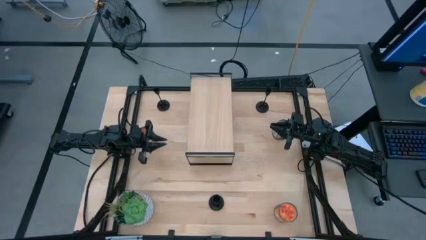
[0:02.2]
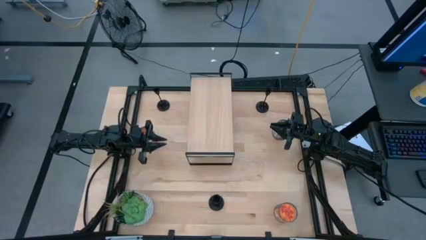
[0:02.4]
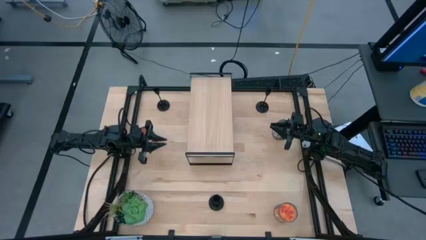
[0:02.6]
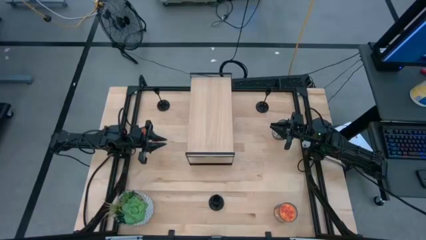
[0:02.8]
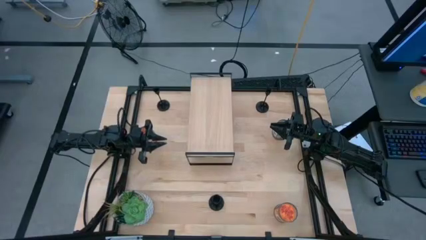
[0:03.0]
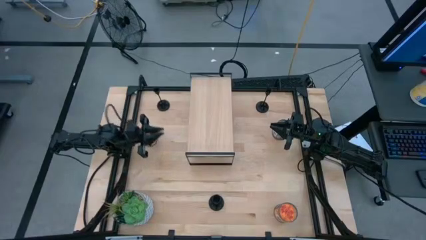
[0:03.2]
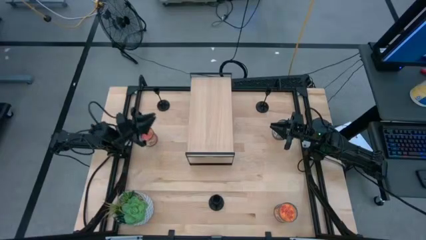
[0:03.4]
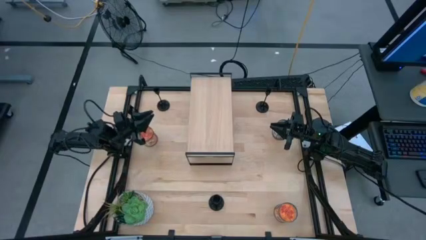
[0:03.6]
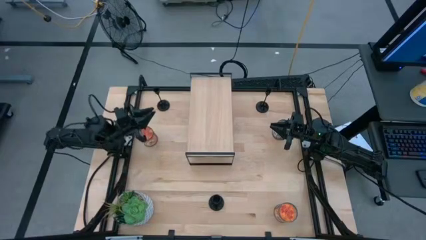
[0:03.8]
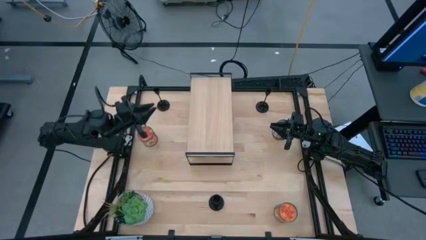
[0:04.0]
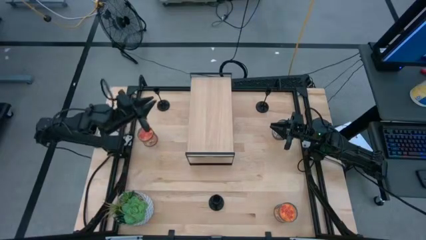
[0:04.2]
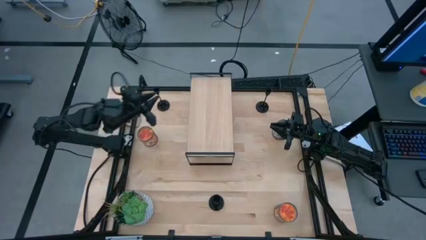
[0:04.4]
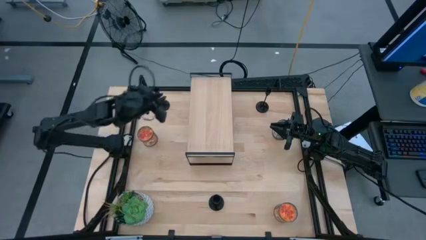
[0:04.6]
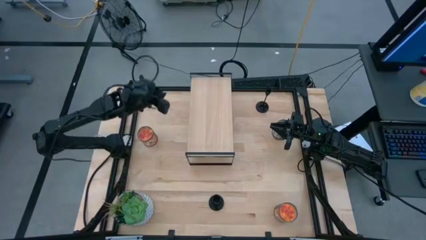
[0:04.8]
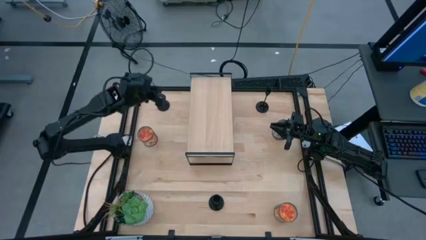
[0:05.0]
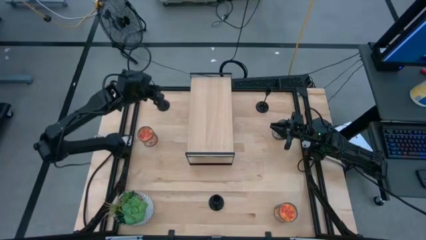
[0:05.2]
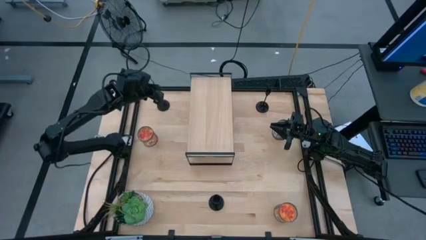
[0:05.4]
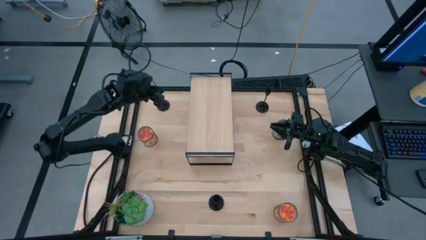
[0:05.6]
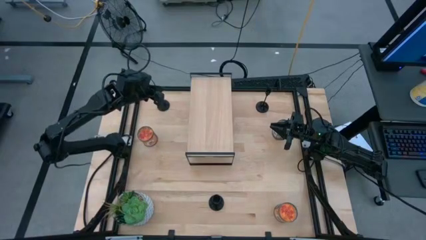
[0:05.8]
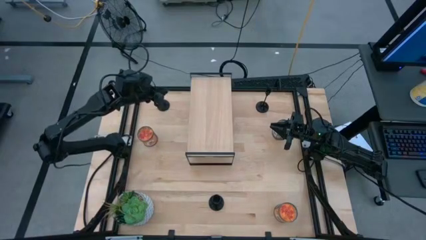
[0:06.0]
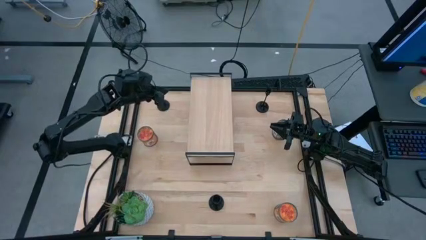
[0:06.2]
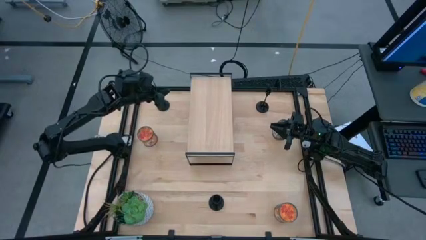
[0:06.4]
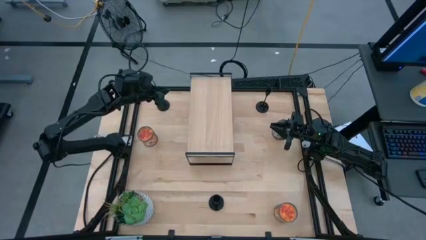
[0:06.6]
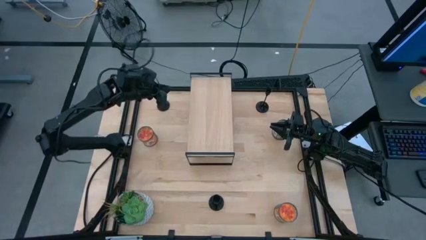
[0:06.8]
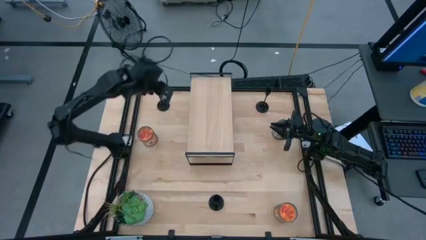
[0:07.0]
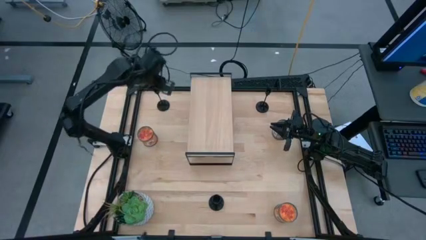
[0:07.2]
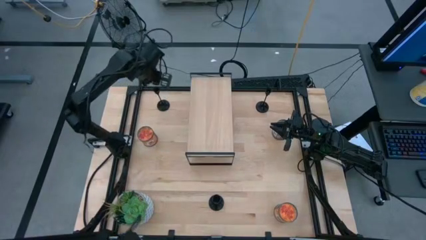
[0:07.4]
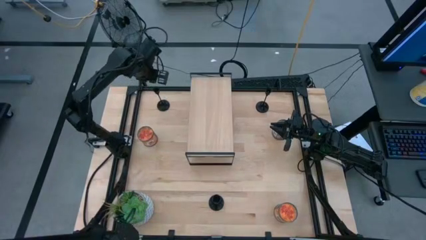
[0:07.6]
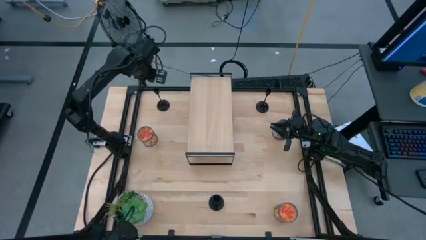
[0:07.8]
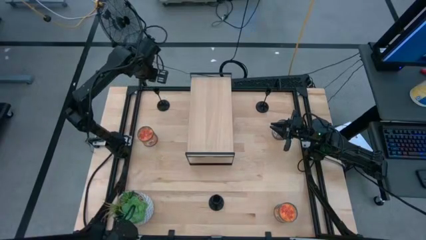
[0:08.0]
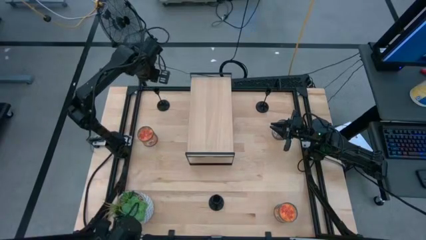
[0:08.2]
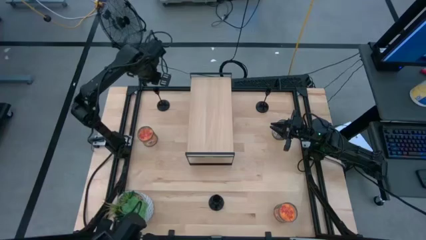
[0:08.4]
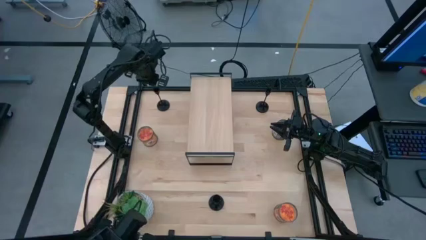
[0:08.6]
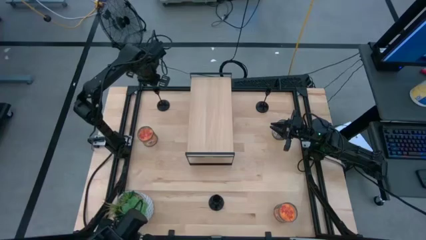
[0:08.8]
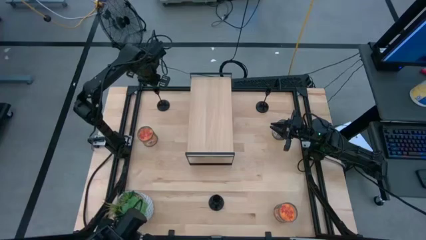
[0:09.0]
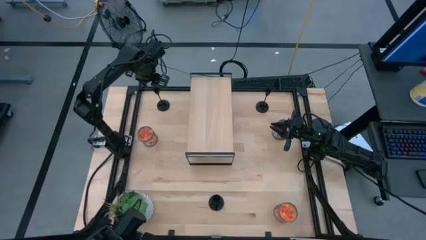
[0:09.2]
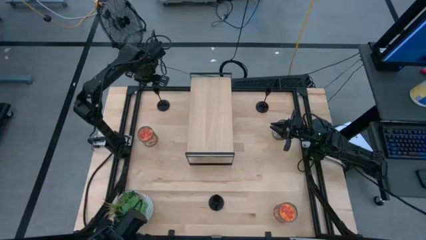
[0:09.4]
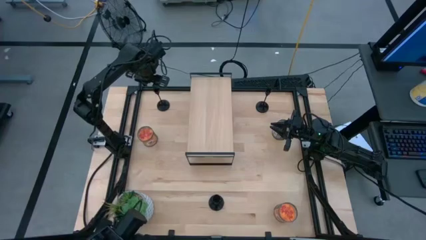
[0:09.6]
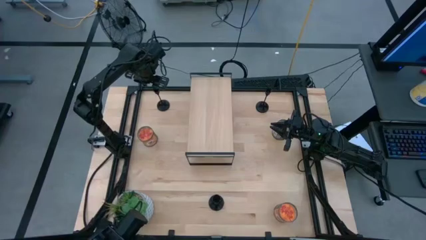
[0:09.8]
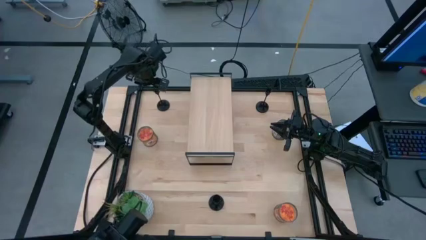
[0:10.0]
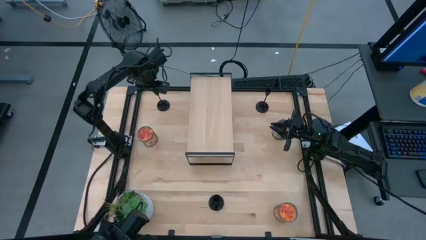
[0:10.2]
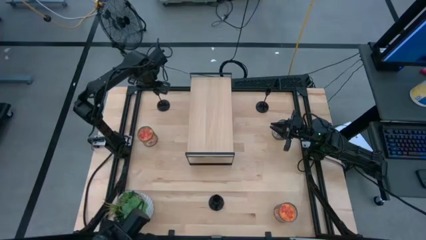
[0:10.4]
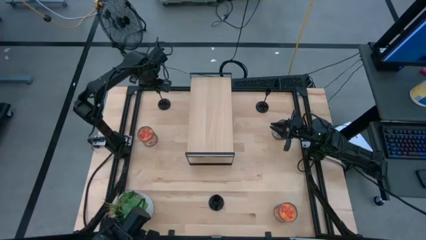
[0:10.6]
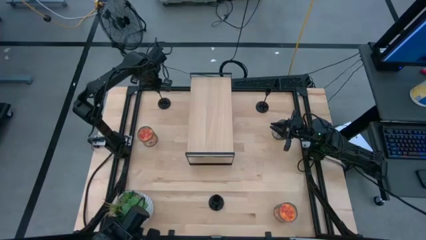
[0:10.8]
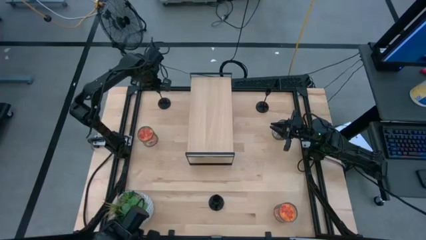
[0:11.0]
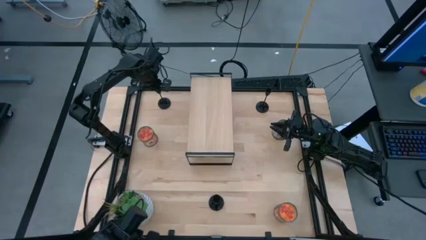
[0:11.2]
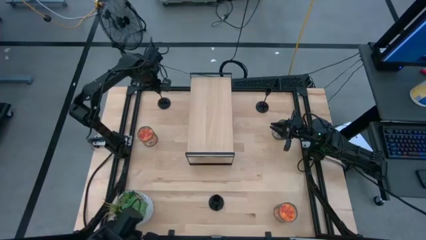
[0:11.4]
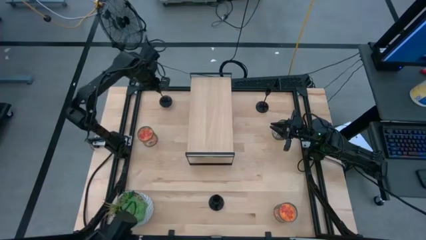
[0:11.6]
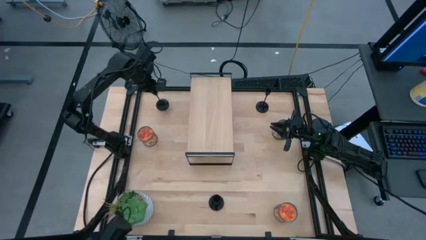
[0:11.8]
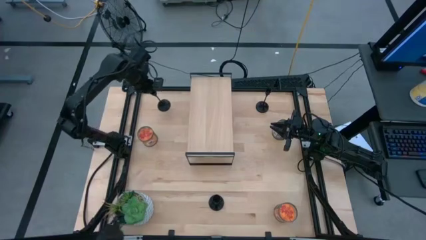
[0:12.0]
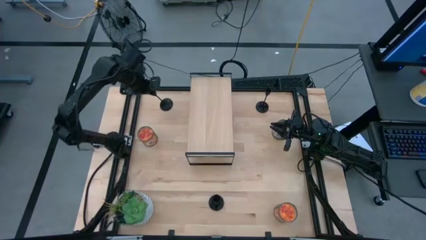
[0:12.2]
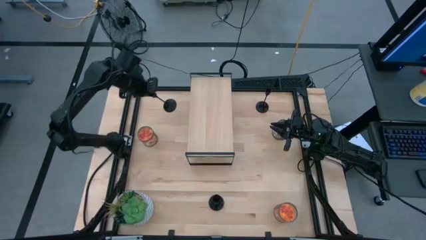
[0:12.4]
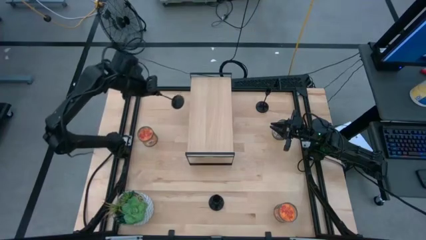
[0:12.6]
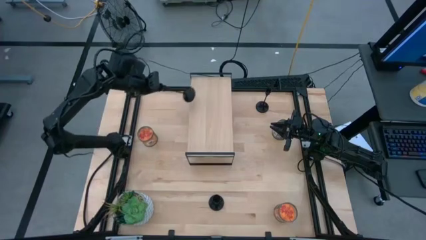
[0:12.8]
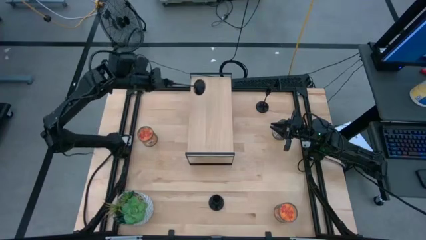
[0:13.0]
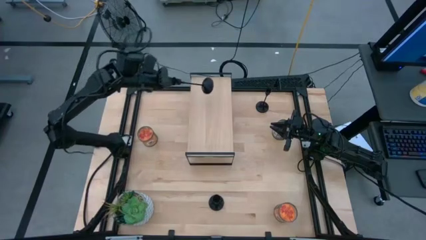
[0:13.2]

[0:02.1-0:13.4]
Task: Pick & Place candle stick holders
Put the top left black candle holder on the shelf

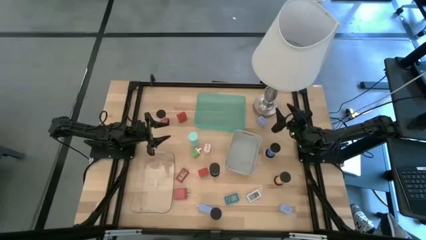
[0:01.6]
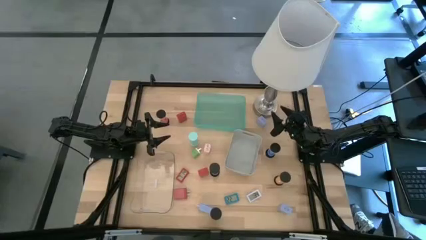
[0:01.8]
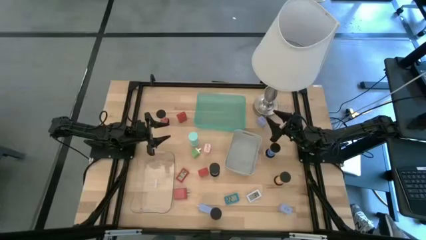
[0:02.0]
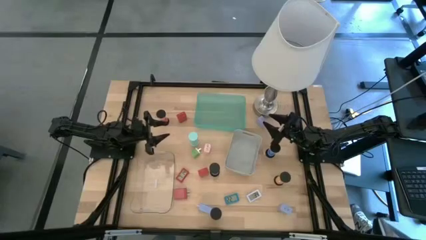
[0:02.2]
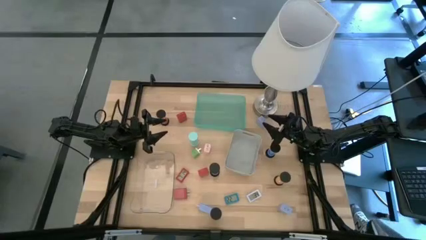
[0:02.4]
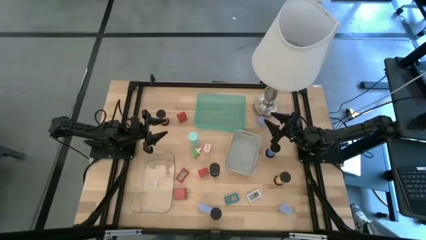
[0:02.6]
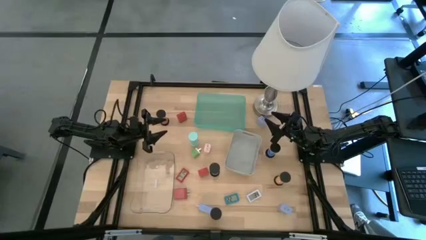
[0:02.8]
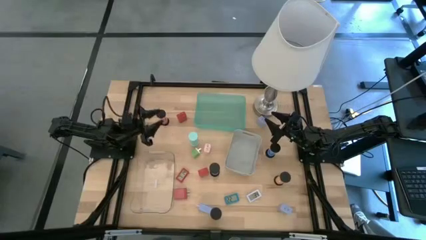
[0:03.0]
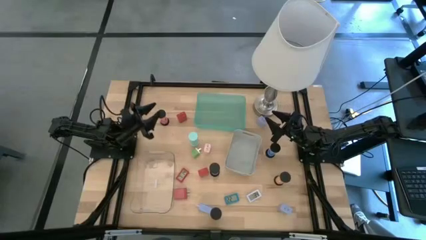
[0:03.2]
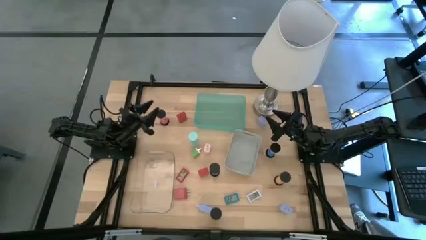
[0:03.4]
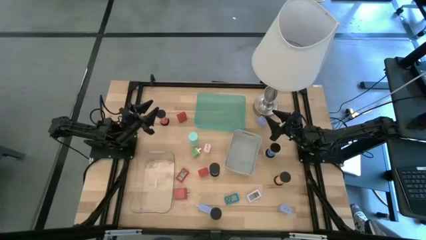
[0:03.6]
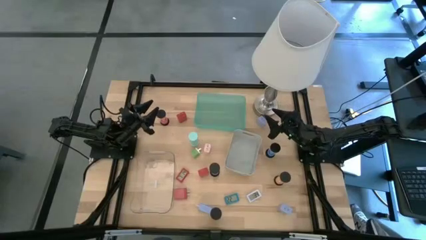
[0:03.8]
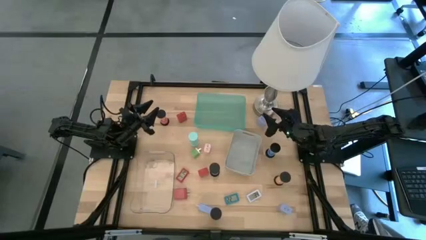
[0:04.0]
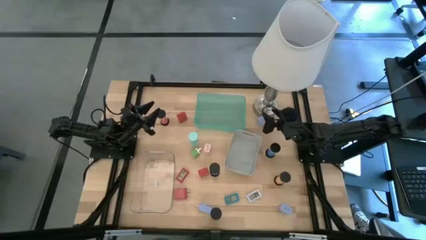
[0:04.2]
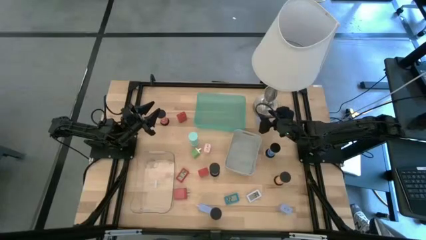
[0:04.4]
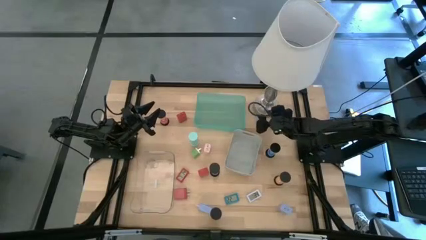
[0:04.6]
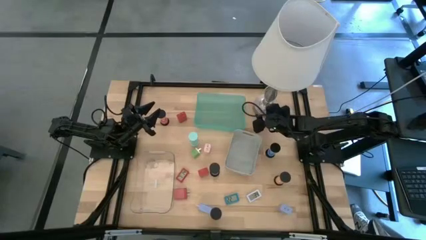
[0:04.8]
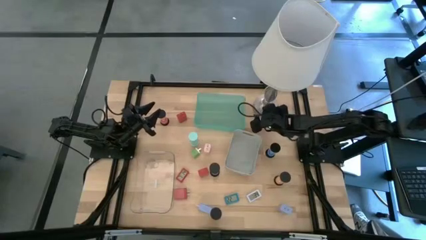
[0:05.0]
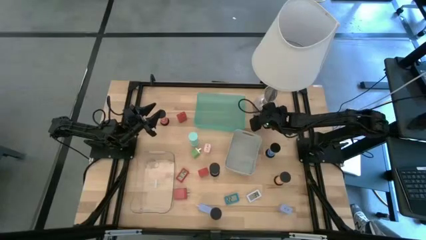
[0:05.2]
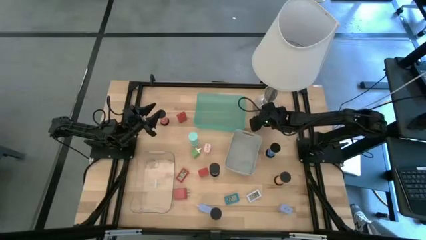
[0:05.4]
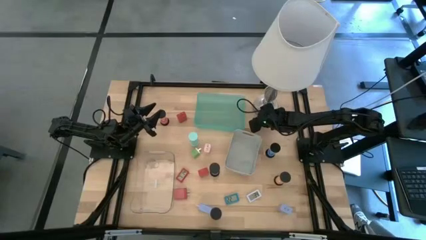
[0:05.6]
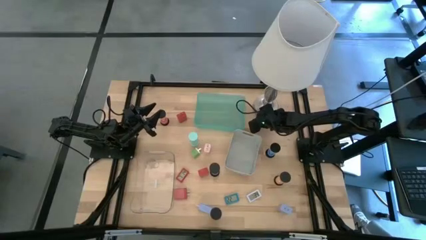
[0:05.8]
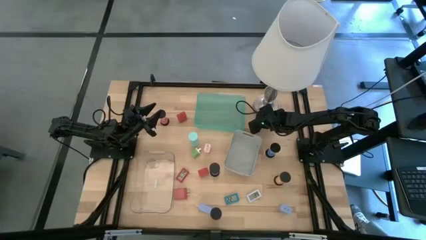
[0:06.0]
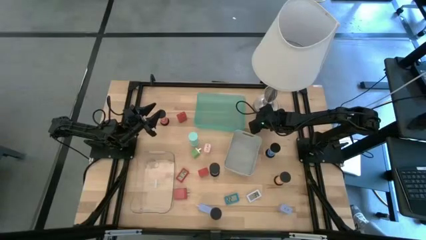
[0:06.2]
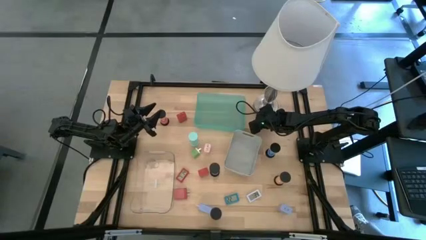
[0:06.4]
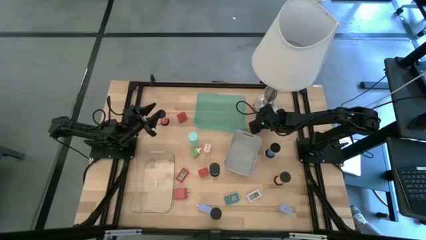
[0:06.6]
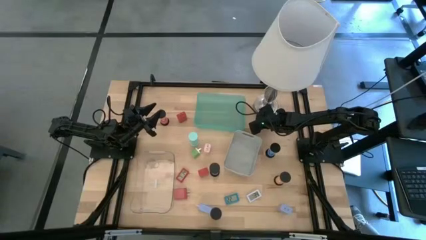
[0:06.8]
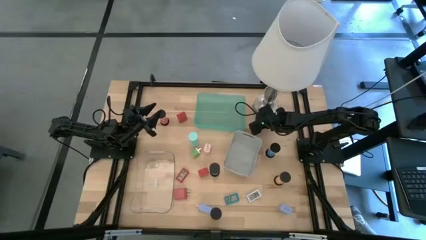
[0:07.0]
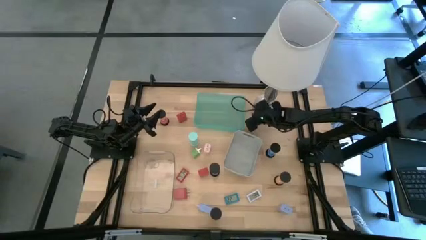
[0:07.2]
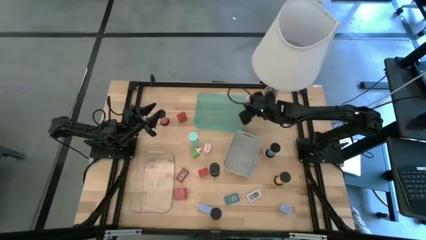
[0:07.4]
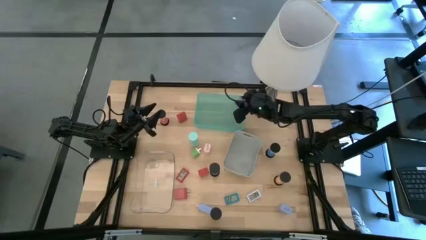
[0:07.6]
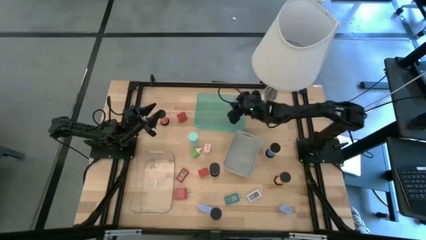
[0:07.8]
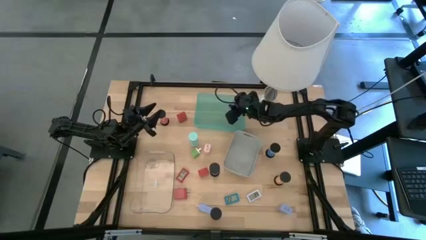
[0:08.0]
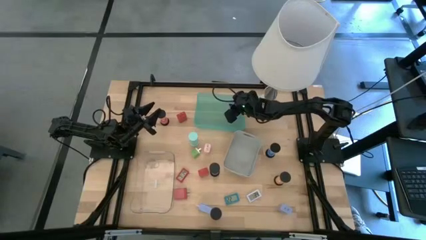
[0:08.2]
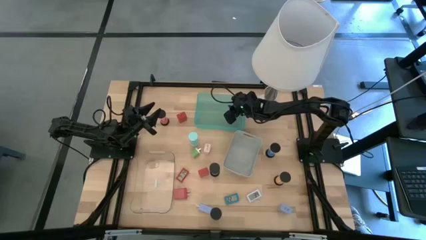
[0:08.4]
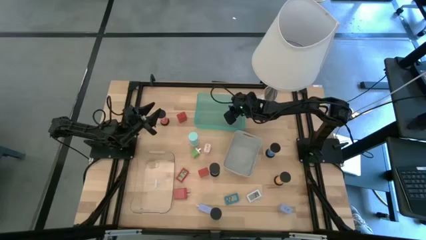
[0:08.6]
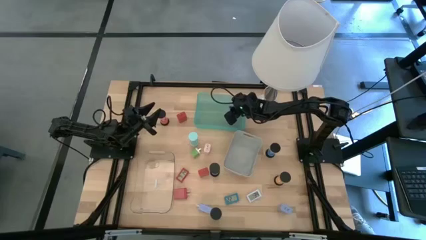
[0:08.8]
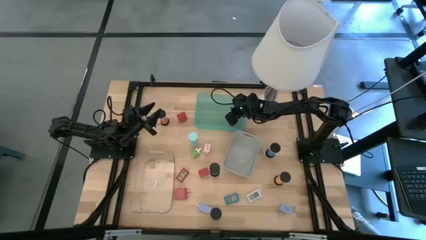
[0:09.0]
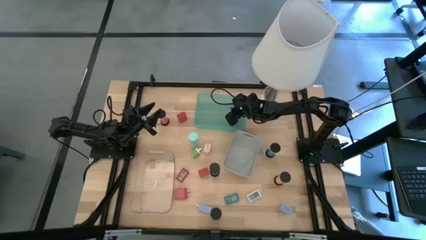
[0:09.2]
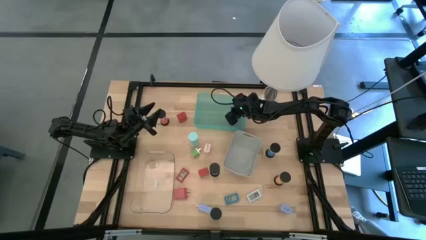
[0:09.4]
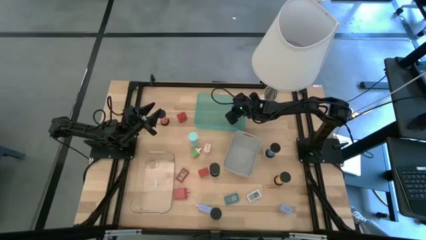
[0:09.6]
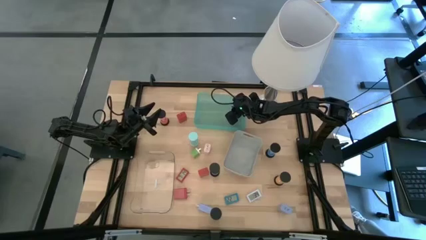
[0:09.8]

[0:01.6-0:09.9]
Task: Pick & Place Office items
Put the top light violet charger adapter into the green bin
